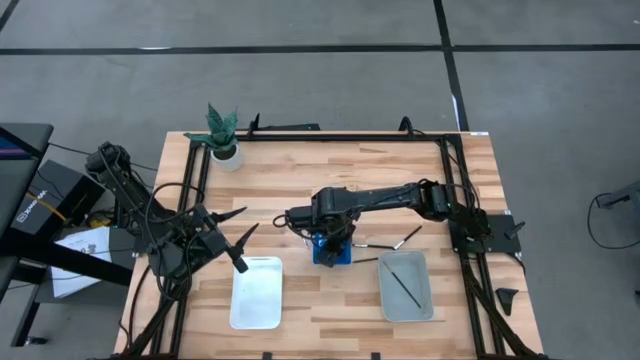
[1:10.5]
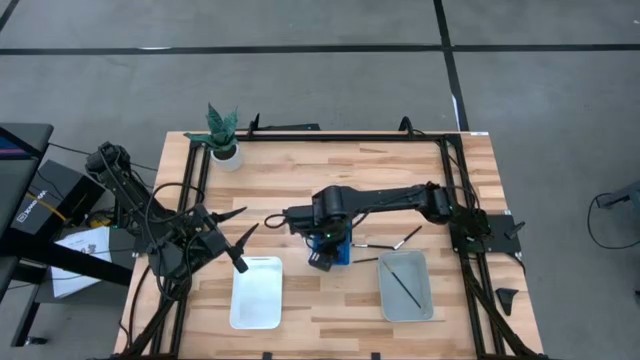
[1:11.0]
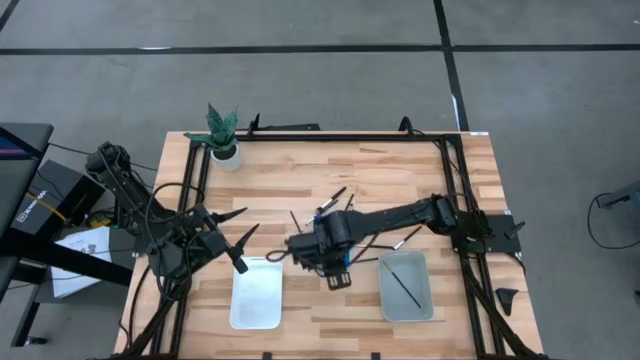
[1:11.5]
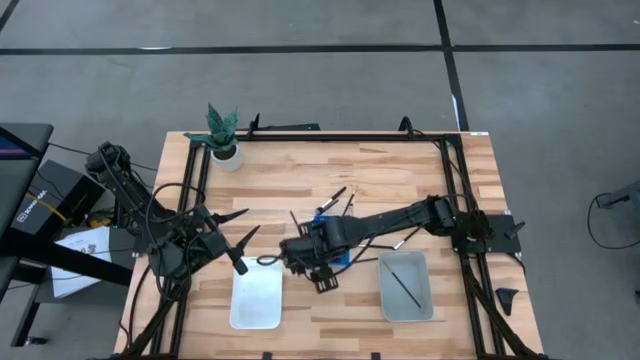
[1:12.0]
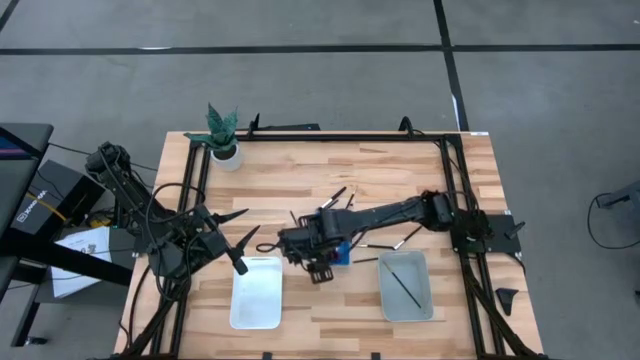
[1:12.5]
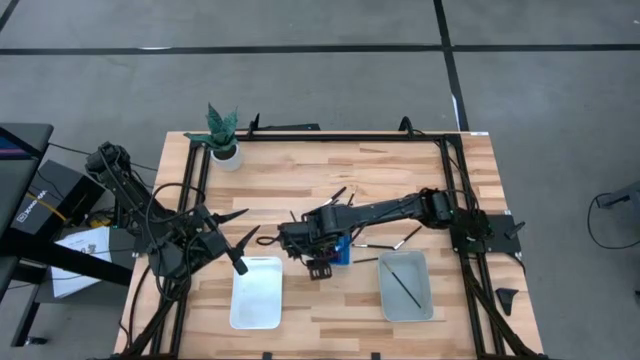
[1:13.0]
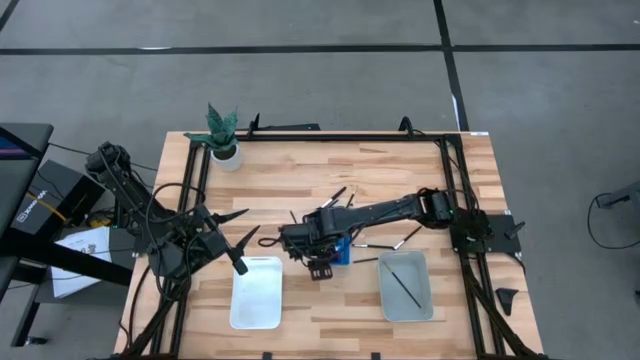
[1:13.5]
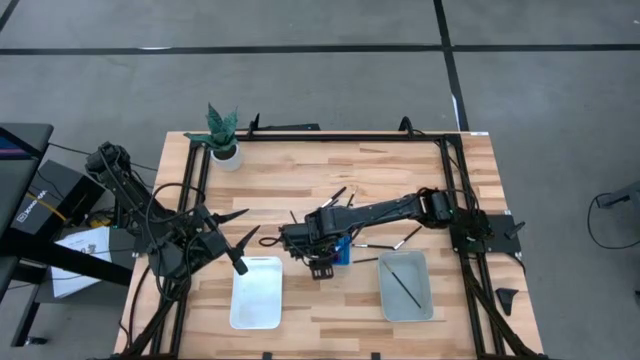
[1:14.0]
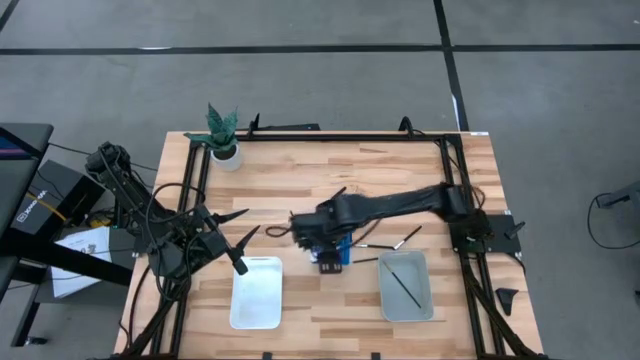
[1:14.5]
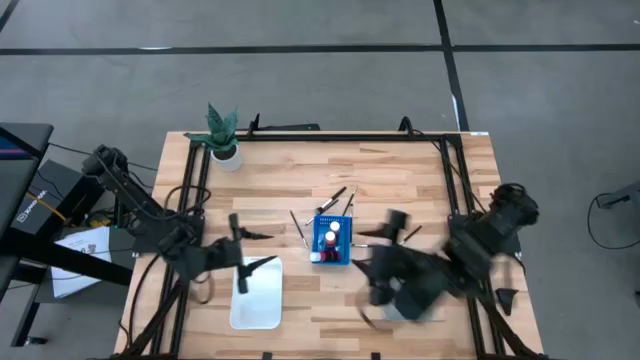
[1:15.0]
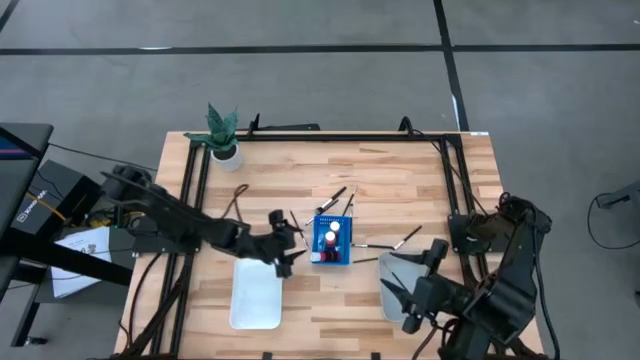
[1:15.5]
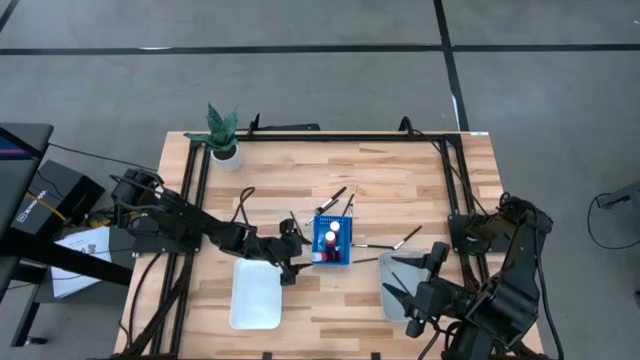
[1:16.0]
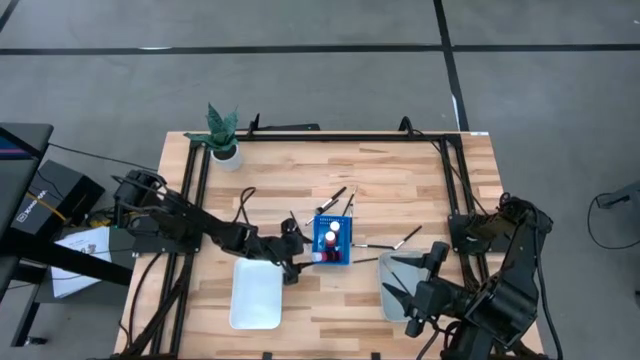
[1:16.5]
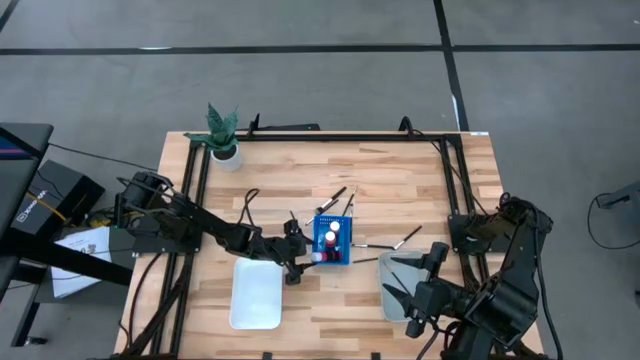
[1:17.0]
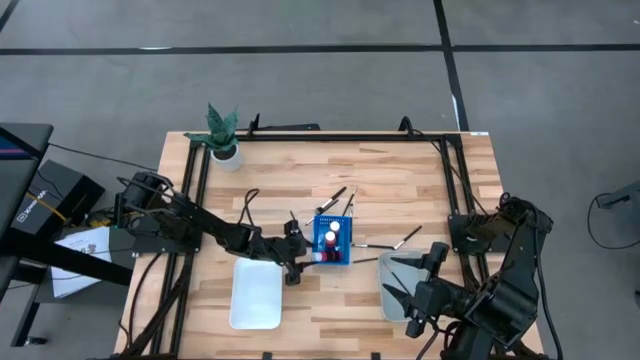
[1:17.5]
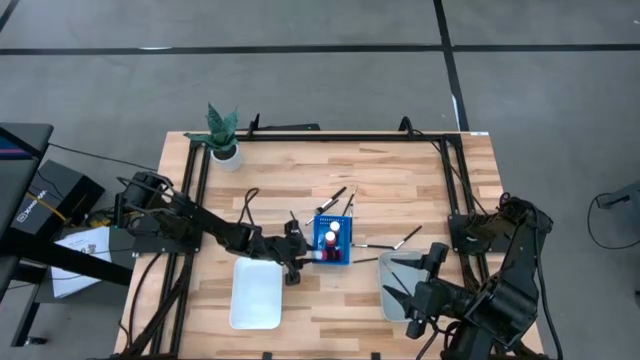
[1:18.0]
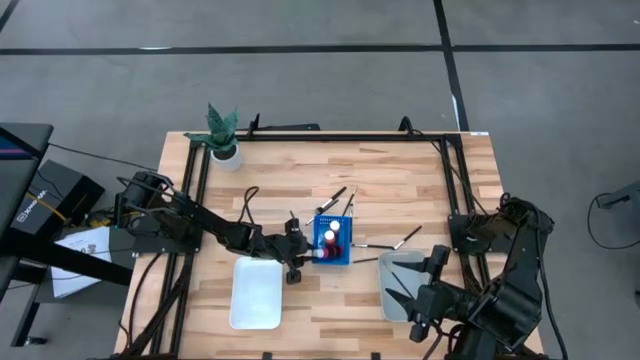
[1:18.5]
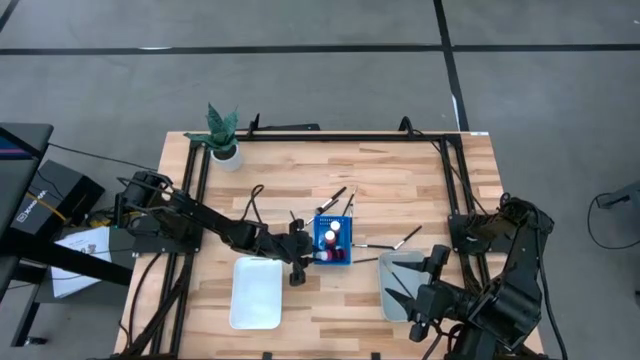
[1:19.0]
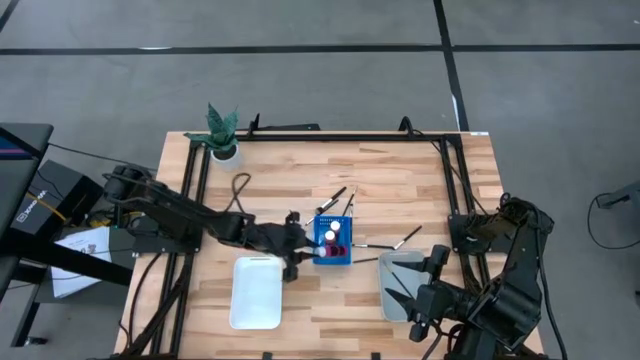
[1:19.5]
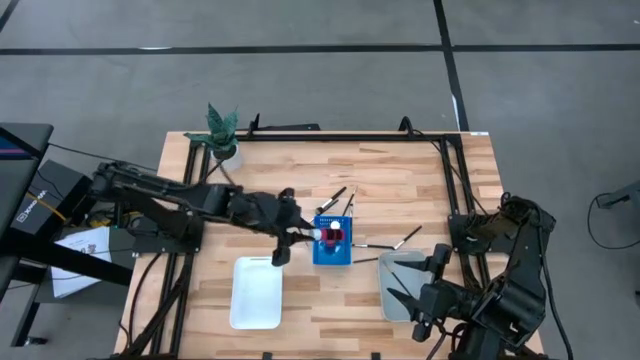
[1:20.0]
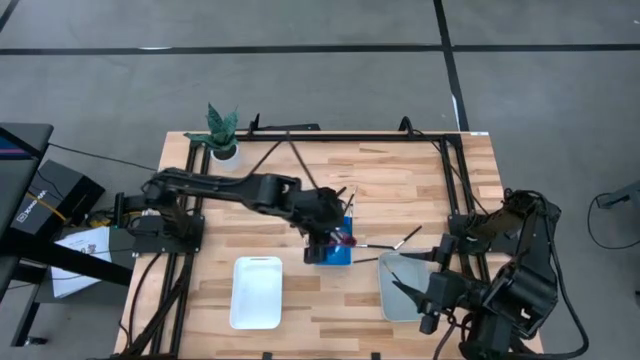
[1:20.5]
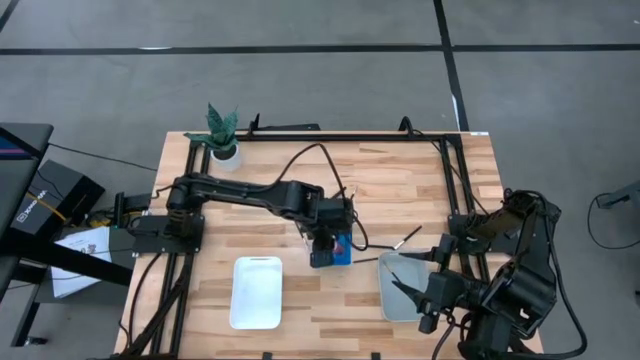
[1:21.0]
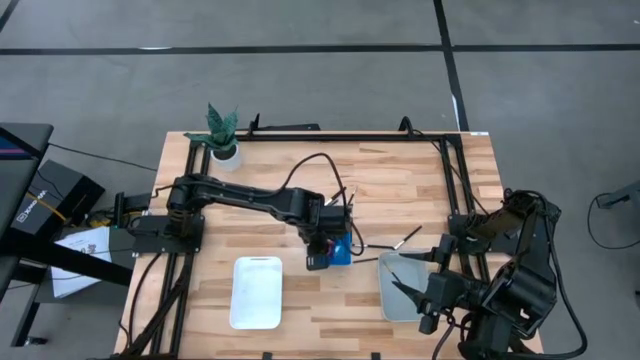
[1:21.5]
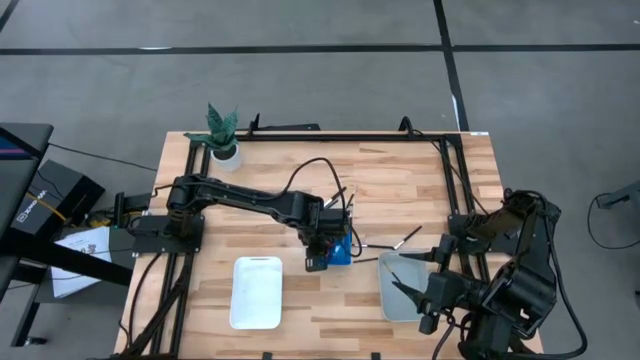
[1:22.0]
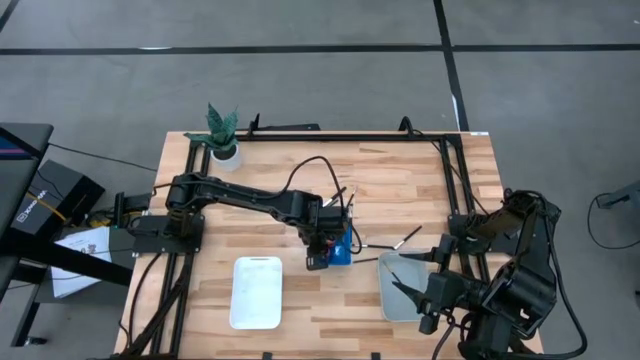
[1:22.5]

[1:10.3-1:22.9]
Task: Pick & Place Paint Supplies
Put the pink paint bottle into the blue bin

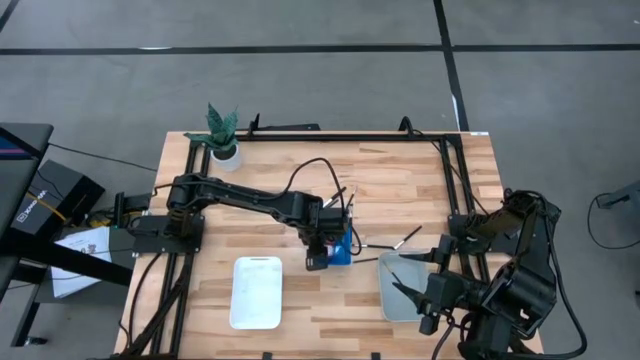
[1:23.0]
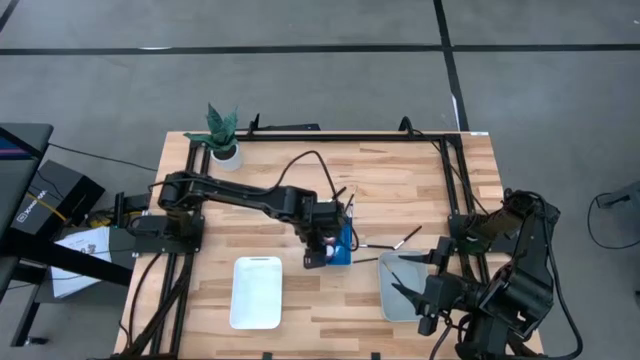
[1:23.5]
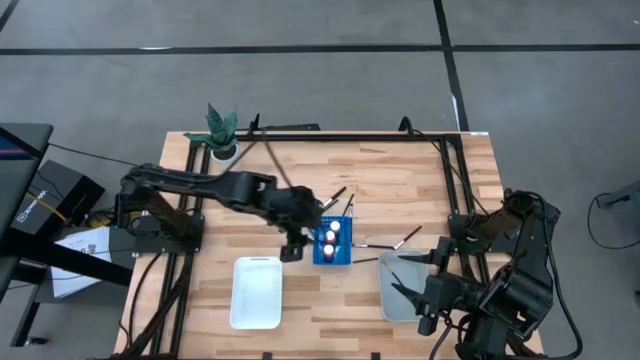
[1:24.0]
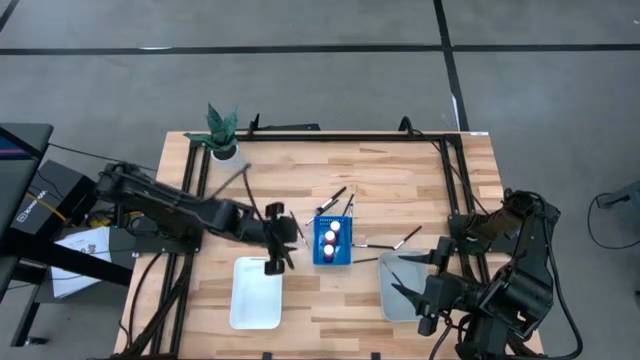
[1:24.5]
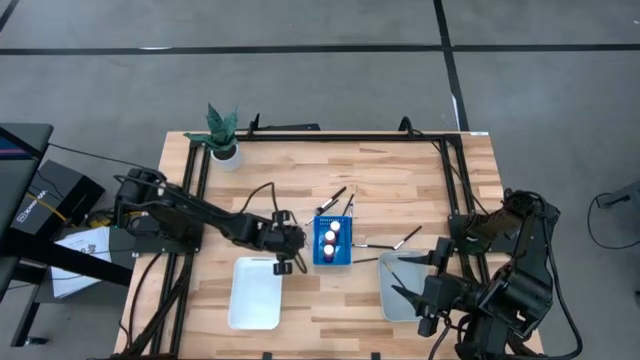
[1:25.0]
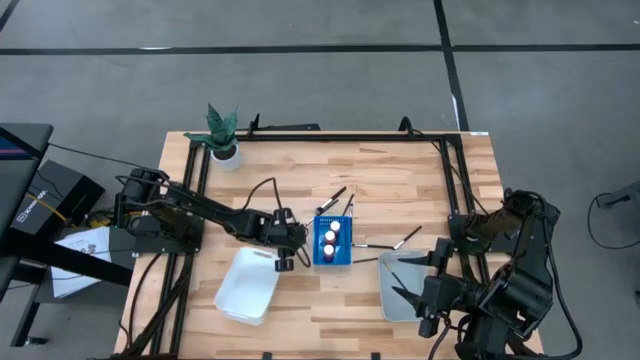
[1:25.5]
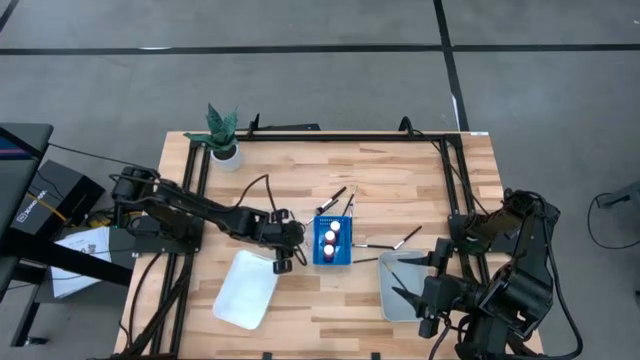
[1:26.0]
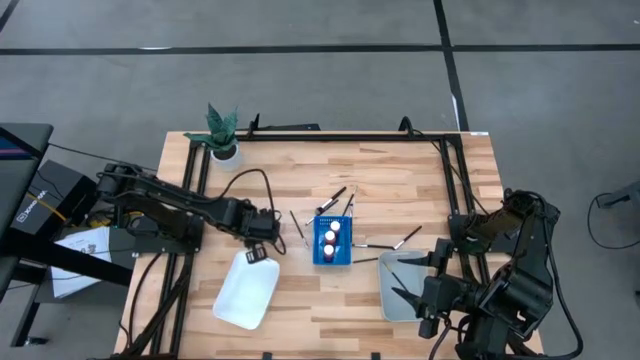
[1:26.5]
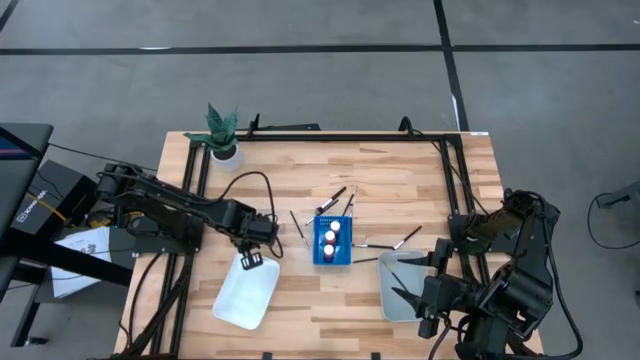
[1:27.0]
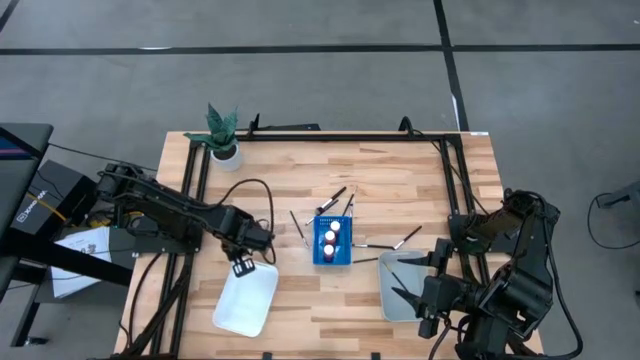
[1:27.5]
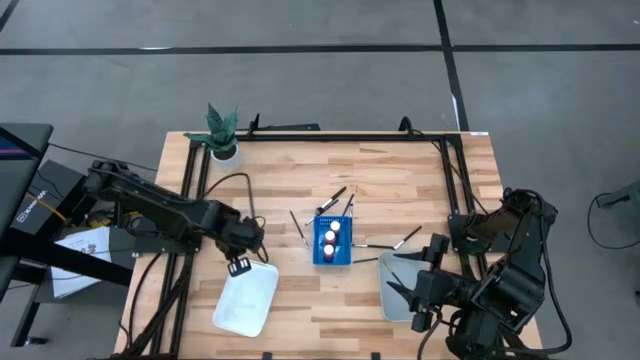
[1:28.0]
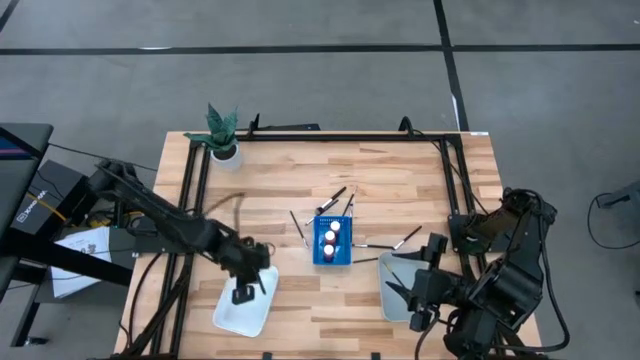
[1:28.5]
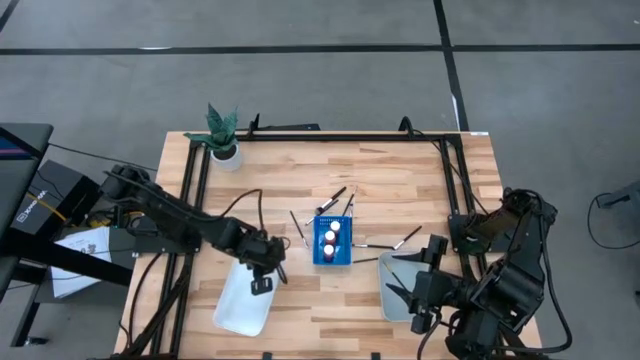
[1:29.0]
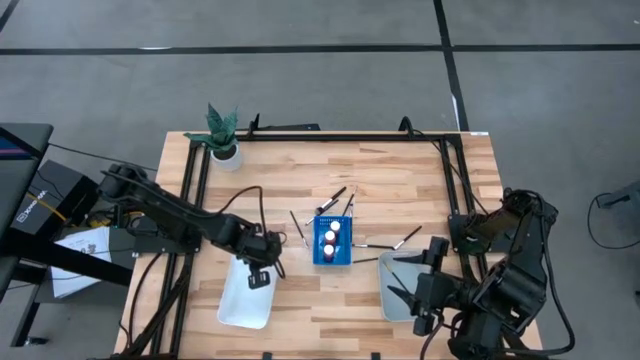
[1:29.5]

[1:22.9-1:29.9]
Move the white bin
